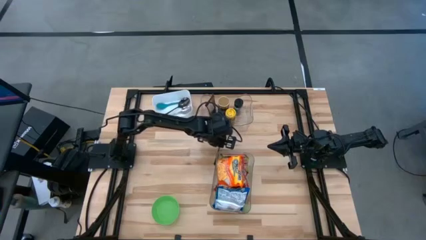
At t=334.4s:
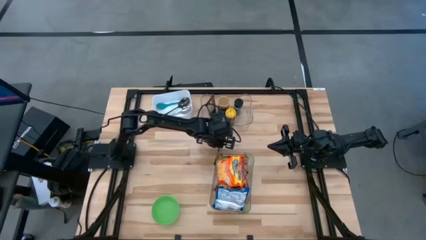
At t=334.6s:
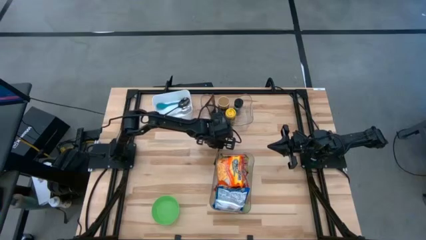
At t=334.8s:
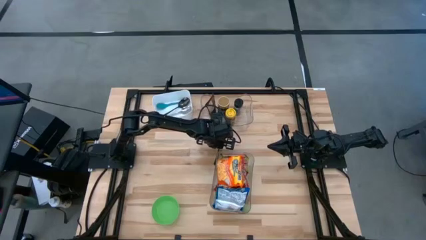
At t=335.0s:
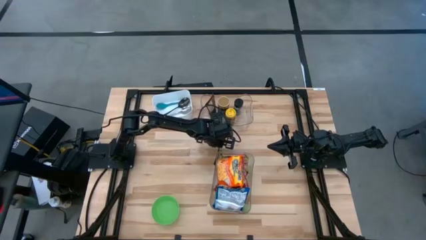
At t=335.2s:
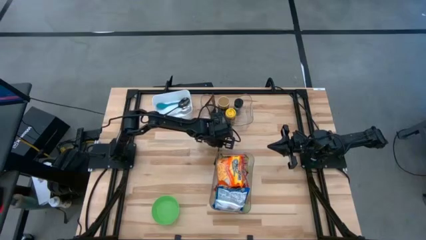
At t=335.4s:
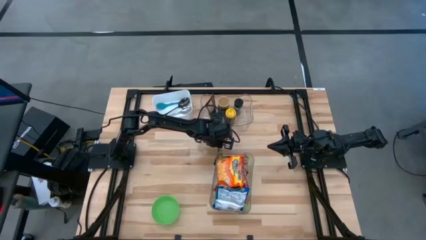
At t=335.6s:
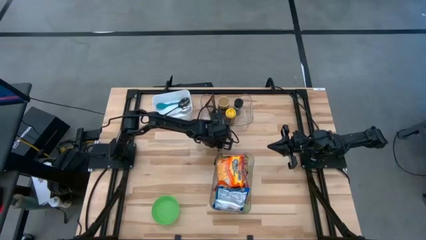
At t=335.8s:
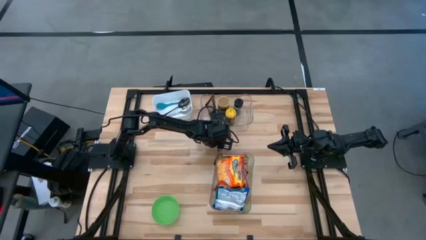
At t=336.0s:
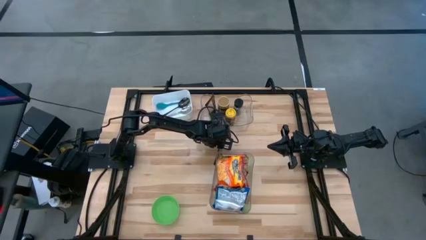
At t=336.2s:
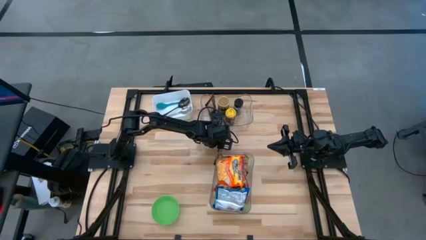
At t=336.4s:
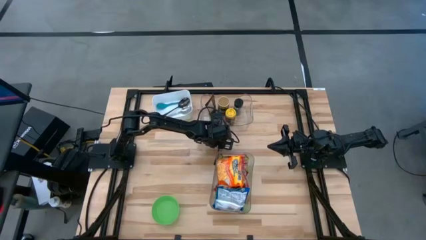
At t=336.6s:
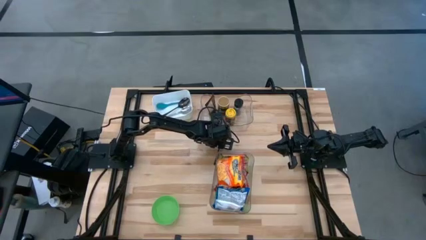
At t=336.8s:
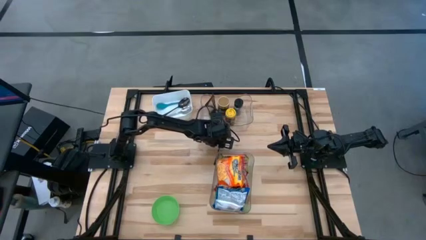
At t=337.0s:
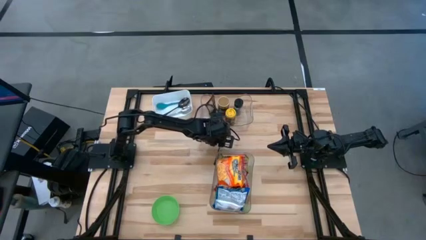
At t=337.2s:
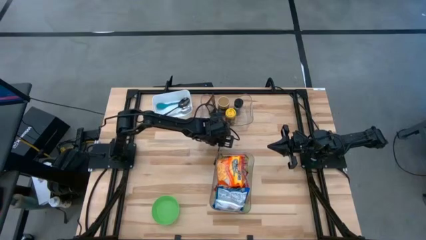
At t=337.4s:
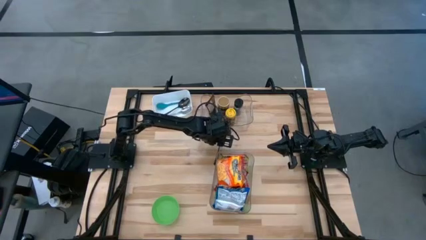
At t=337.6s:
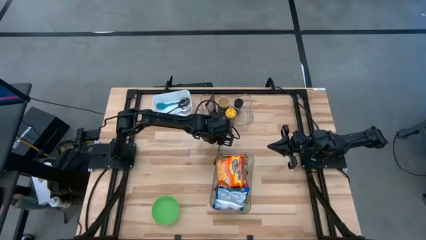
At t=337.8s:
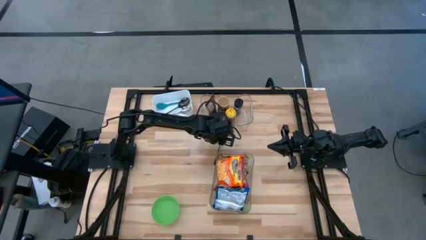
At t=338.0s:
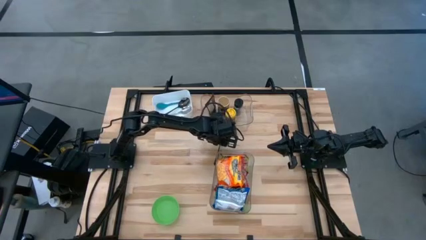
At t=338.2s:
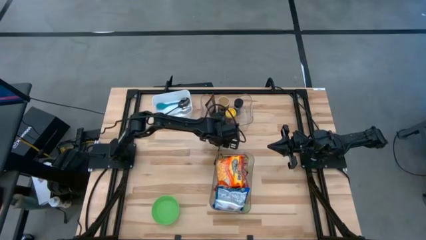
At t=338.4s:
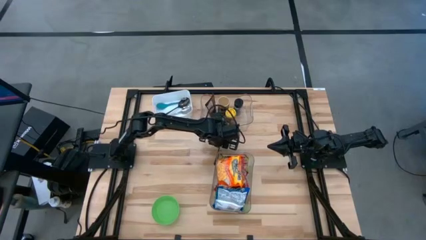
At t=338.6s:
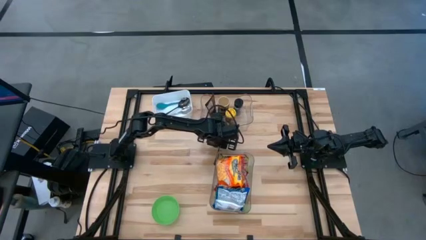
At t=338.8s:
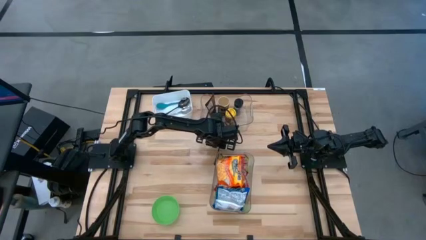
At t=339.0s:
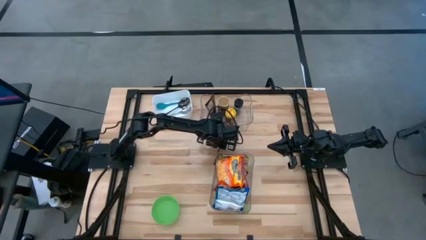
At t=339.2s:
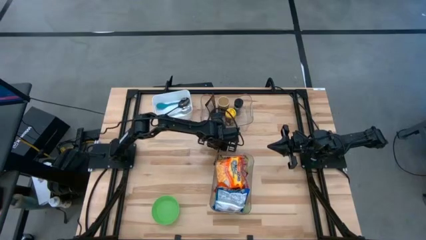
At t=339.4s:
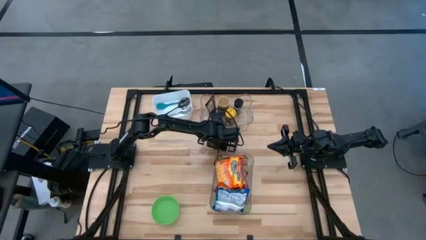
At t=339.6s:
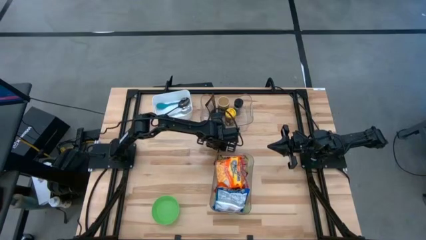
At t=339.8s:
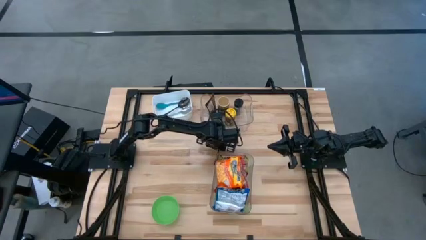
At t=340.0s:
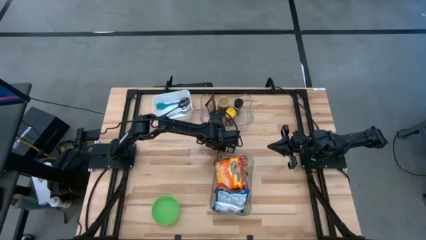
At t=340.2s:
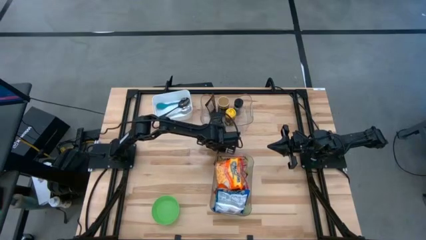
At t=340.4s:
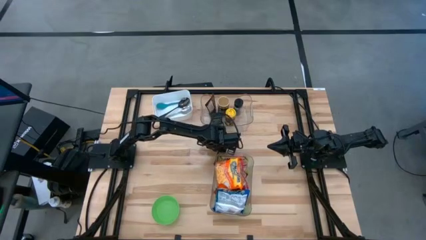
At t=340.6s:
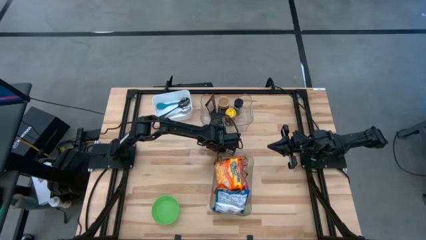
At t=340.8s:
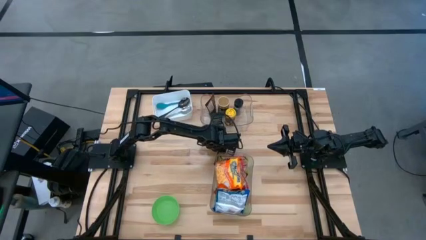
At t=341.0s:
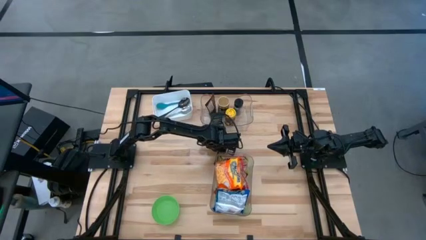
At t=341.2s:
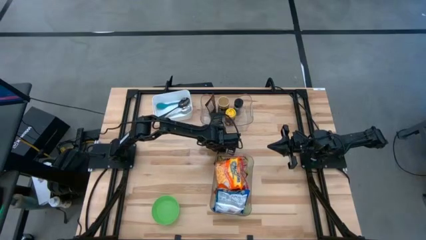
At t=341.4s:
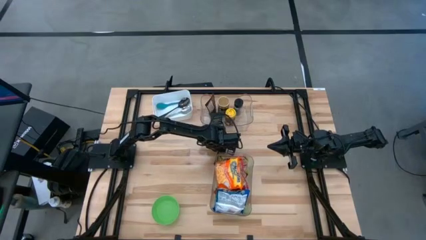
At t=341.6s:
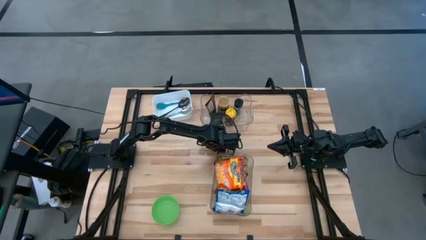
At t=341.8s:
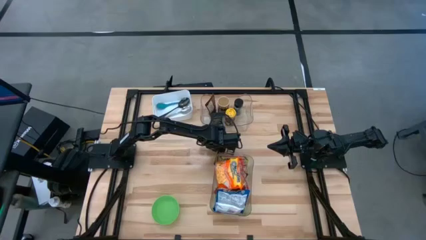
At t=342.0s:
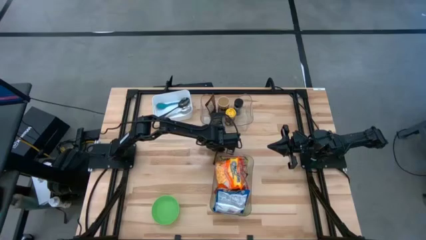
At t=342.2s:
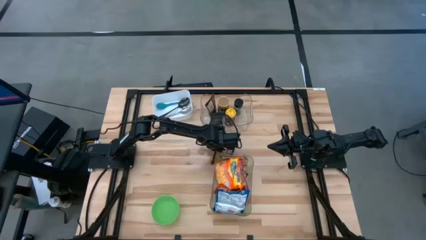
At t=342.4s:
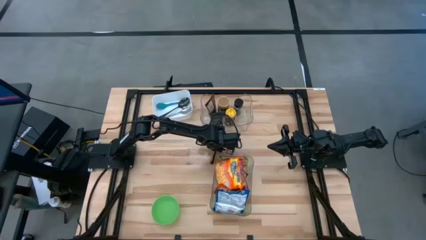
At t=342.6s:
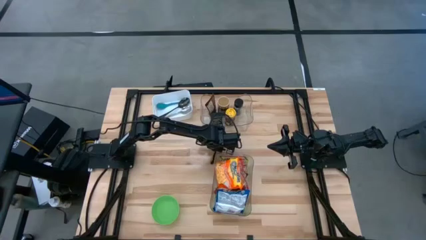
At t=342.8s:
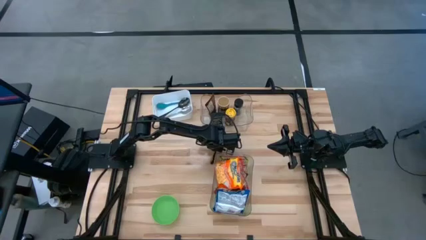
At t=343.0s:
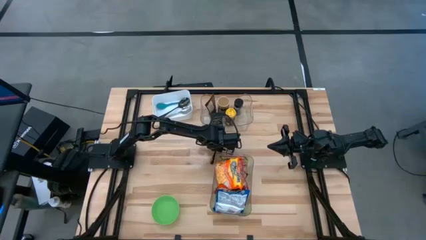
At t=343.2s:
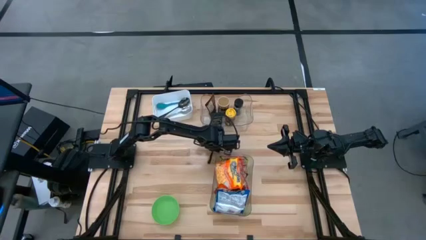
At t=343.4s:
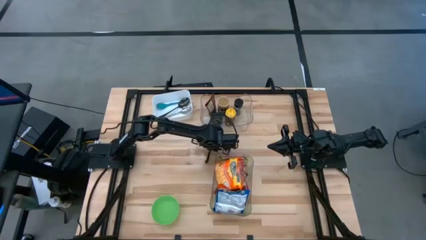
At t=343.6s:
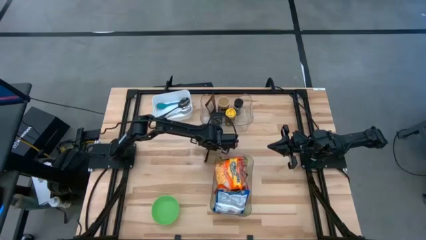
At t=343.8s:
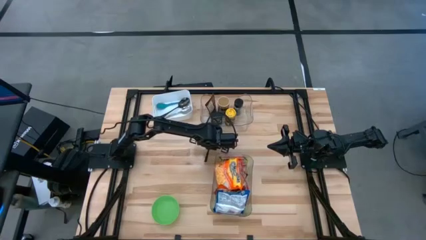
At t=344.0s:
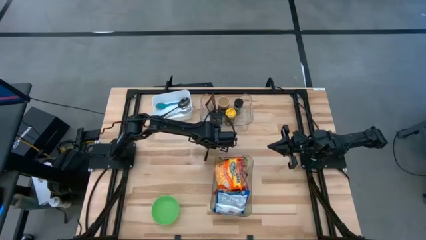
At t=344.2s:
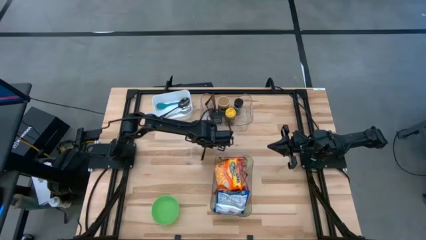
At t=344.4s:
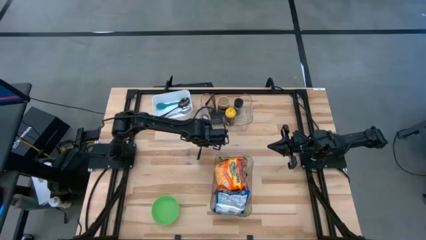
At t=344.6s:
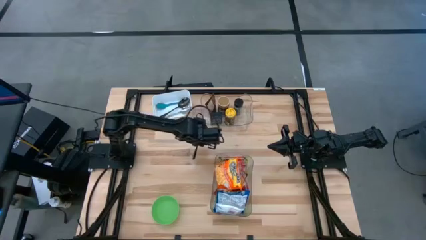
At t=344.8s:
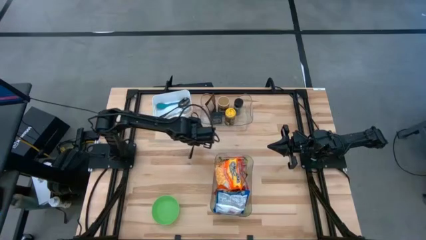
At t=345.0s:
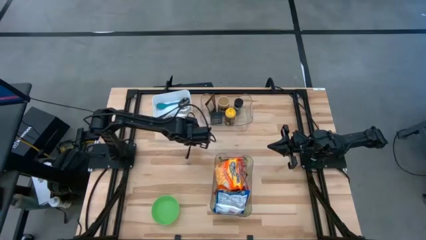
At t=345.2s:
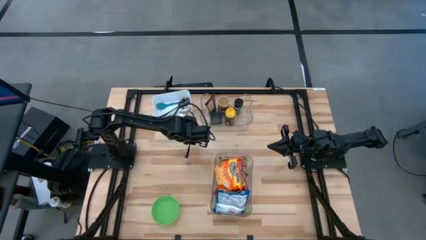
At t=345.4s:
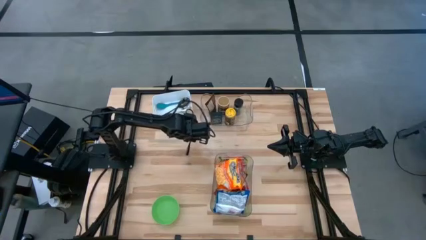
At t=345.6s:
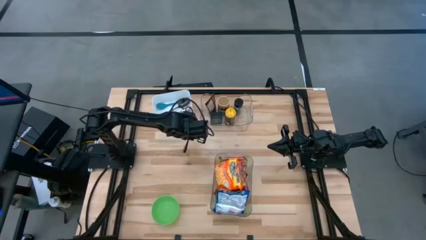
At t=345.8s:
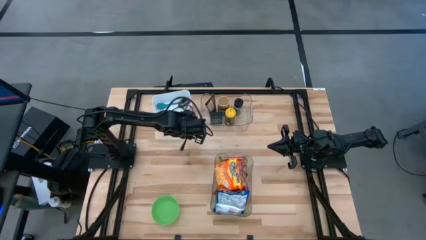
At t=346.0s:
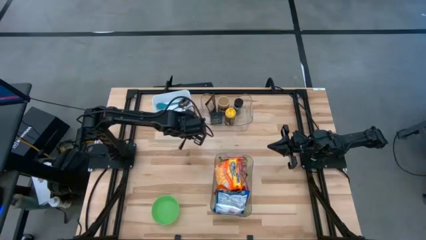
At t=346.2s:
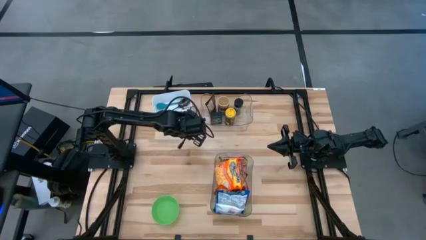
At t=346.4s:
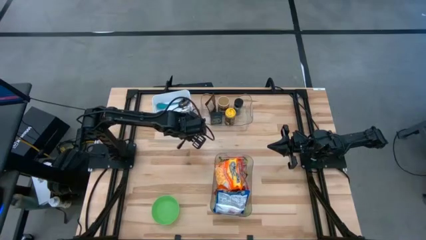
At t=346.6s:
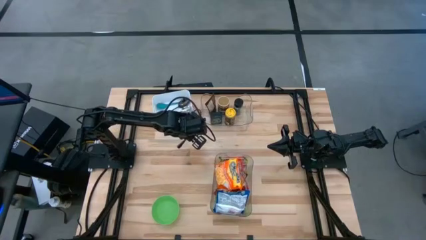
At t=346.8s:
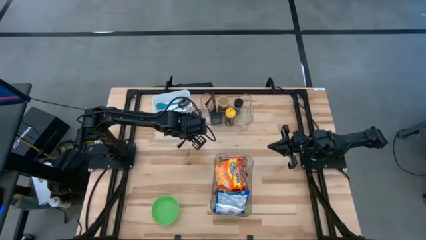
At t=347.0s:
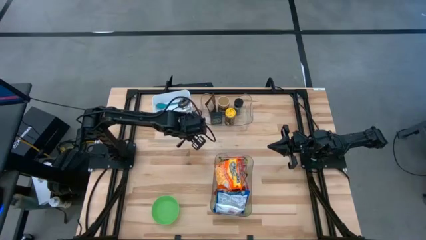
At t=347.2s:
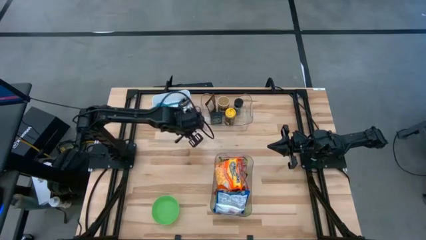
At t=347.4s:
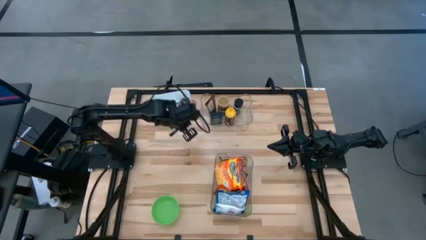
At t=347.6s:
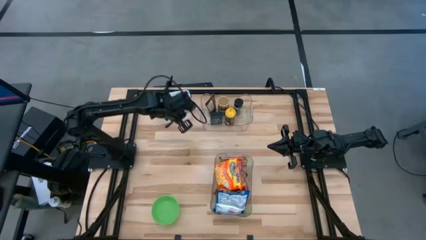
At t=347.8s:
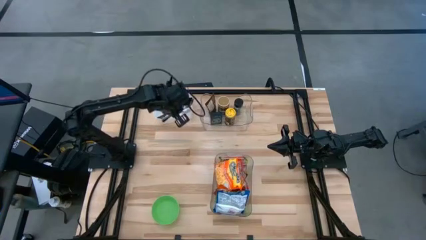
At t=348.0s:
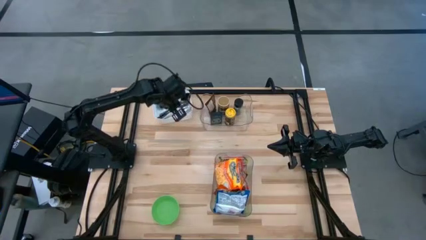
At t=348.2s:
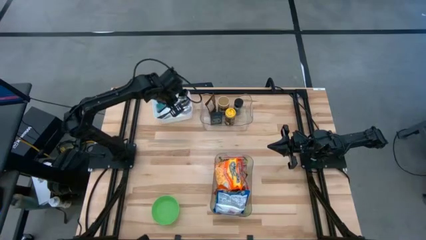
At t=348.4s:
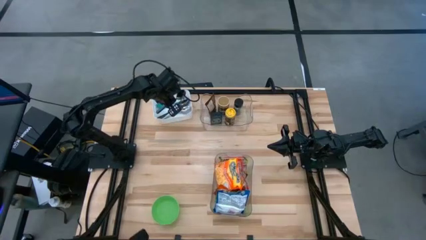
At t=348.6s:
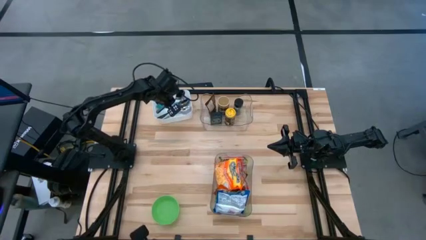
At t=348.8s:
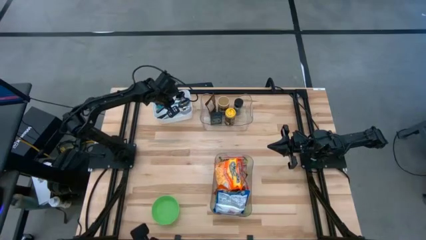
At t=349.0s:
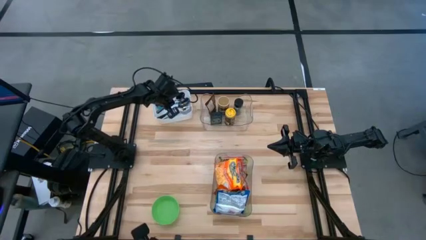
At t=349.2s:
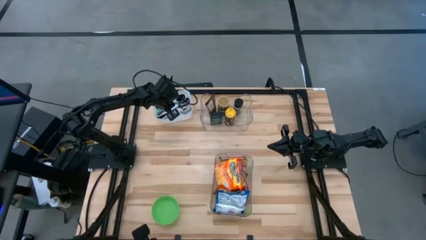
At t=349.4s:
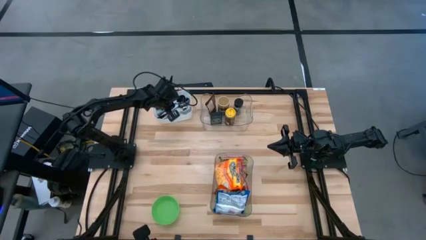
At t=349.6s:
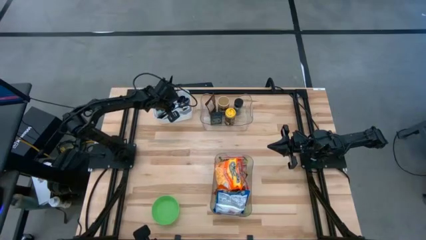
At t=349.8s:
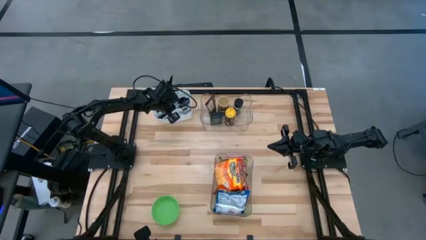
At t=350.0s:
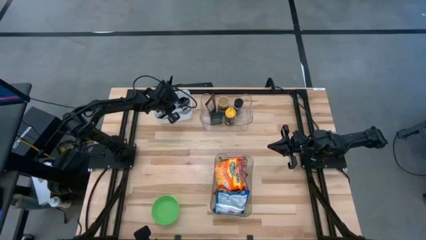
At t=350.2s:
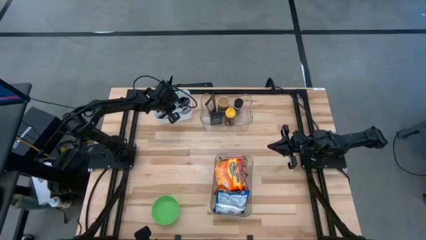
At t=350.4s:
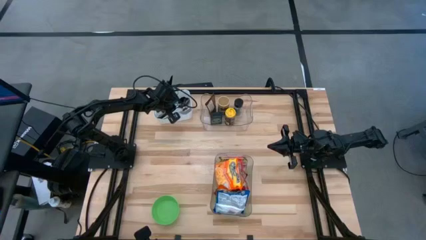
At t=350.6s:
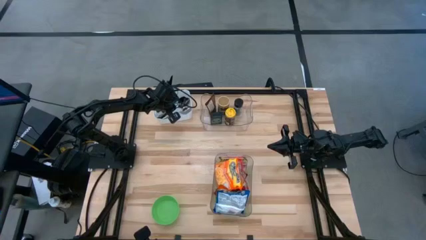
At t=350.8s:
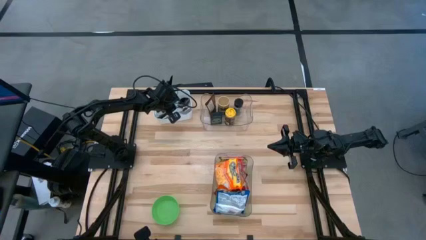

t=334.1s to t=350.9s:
Task: Pick & Place Food Item
Put the black spoon into the white bin
